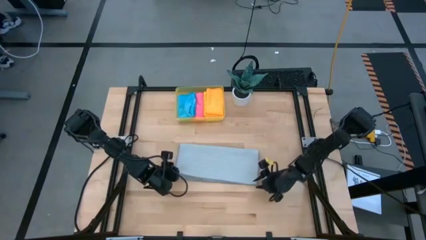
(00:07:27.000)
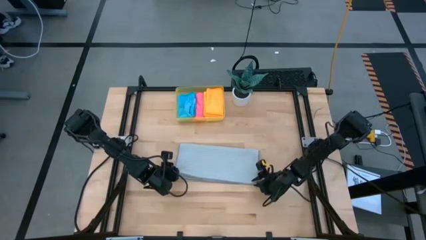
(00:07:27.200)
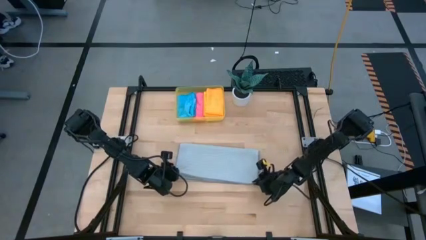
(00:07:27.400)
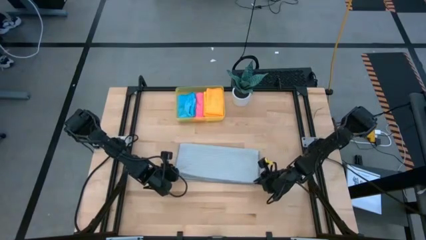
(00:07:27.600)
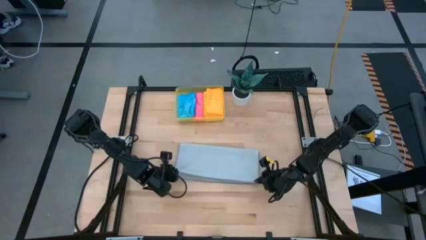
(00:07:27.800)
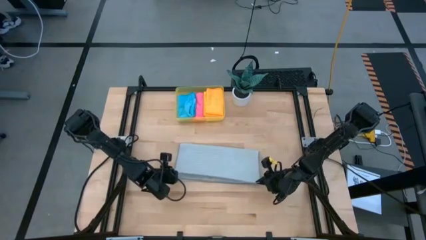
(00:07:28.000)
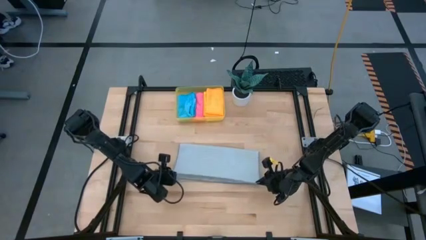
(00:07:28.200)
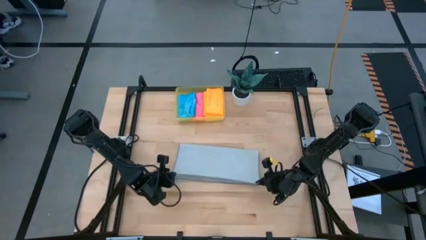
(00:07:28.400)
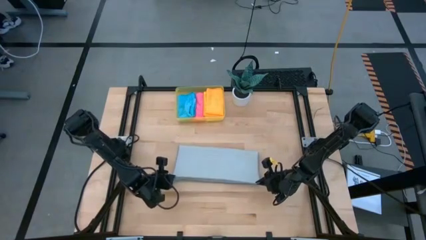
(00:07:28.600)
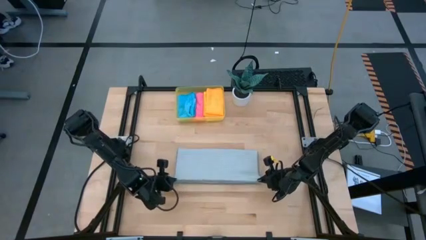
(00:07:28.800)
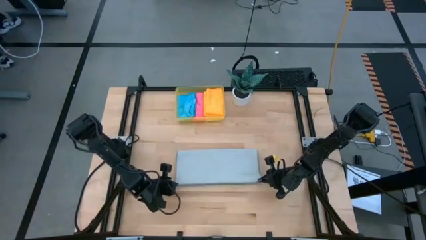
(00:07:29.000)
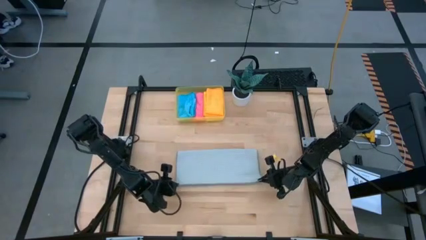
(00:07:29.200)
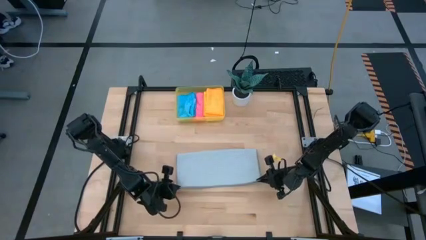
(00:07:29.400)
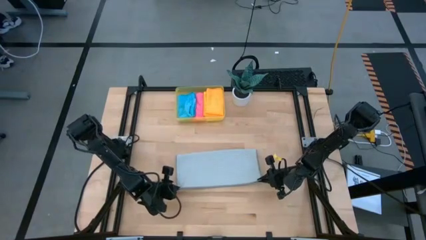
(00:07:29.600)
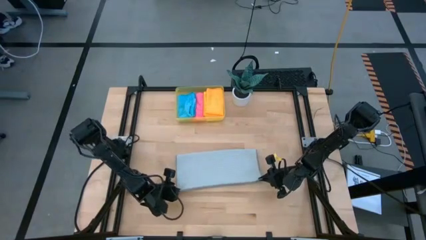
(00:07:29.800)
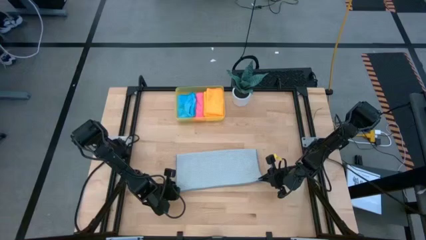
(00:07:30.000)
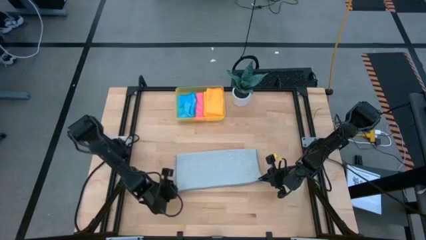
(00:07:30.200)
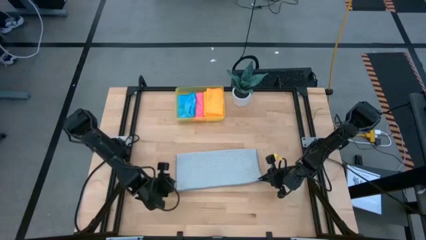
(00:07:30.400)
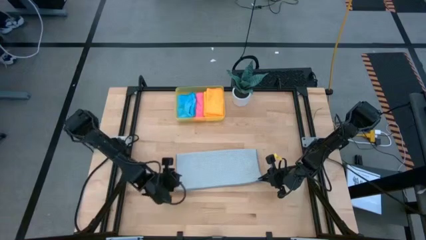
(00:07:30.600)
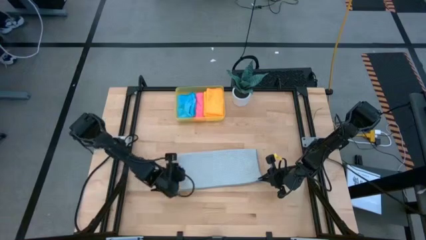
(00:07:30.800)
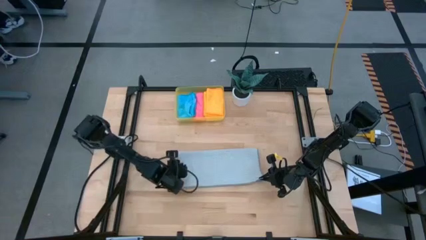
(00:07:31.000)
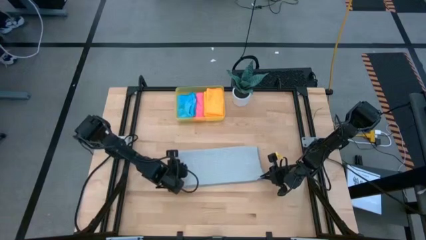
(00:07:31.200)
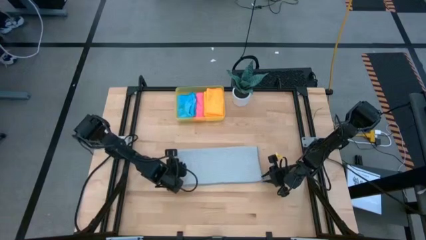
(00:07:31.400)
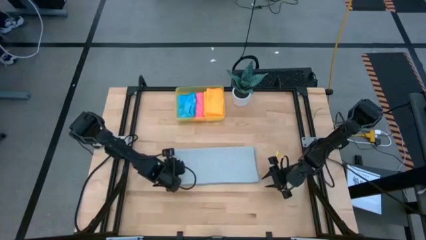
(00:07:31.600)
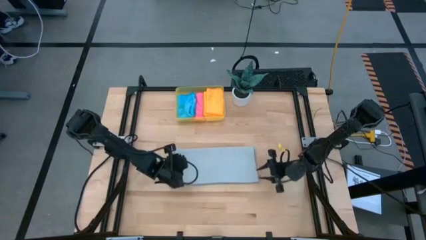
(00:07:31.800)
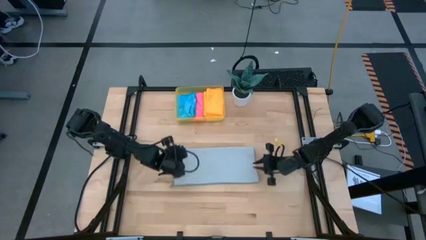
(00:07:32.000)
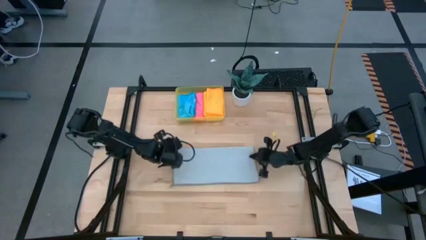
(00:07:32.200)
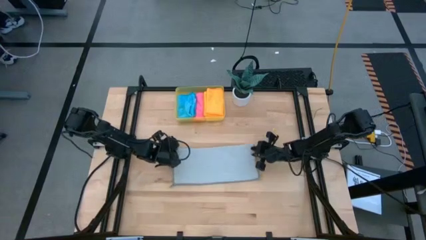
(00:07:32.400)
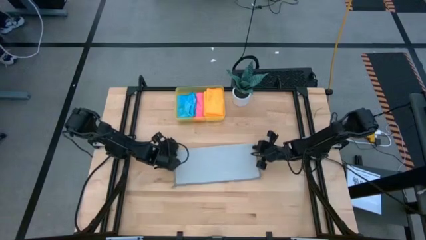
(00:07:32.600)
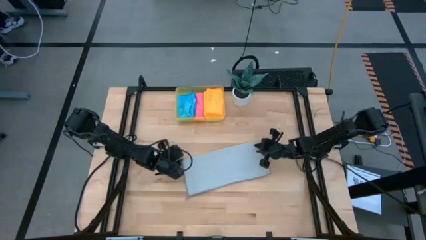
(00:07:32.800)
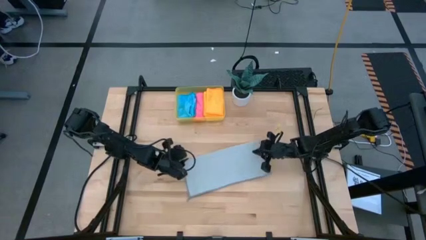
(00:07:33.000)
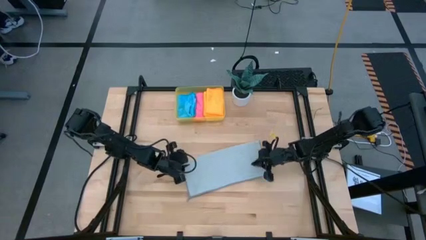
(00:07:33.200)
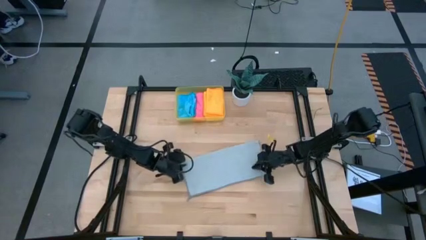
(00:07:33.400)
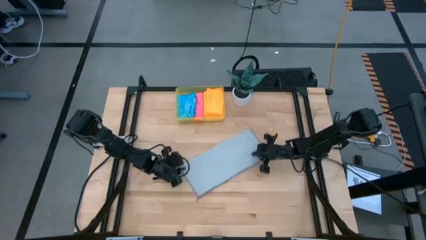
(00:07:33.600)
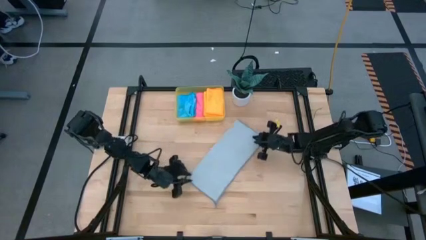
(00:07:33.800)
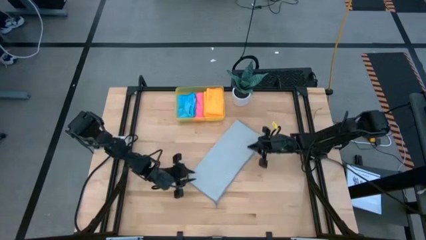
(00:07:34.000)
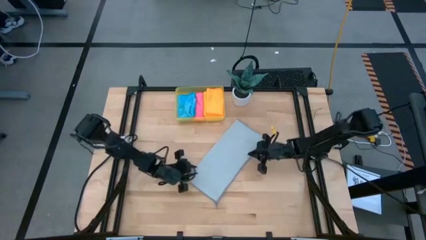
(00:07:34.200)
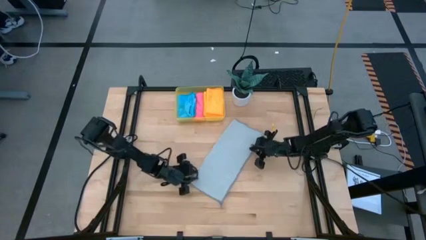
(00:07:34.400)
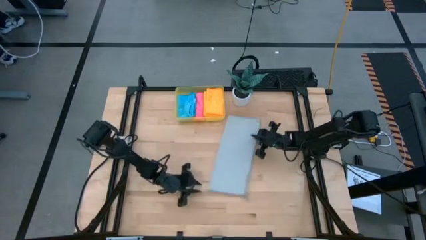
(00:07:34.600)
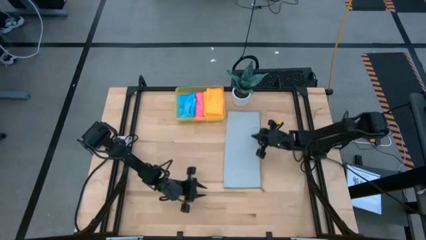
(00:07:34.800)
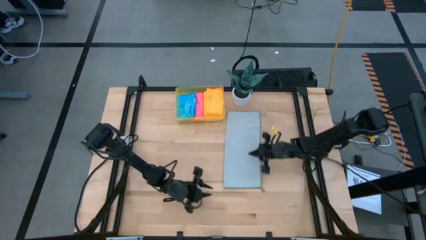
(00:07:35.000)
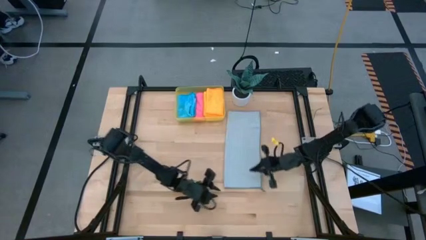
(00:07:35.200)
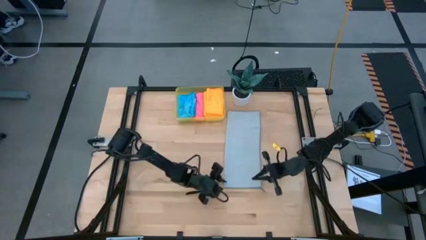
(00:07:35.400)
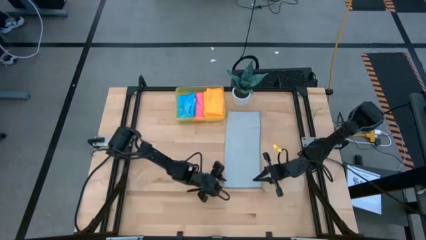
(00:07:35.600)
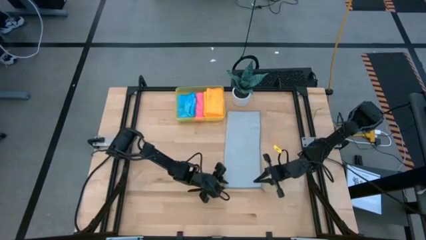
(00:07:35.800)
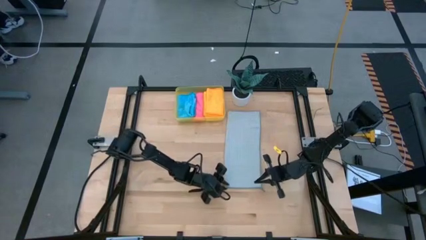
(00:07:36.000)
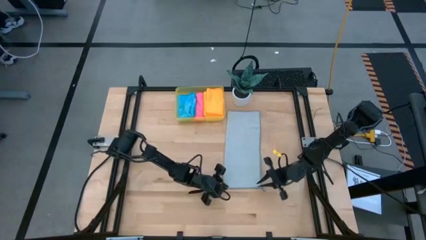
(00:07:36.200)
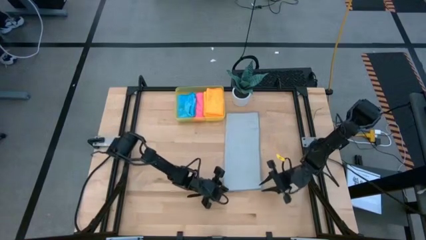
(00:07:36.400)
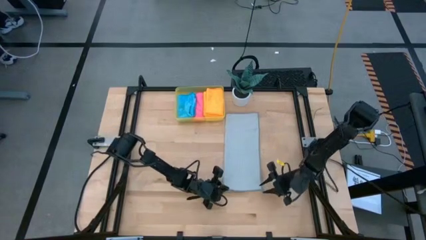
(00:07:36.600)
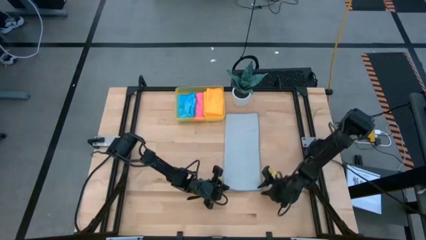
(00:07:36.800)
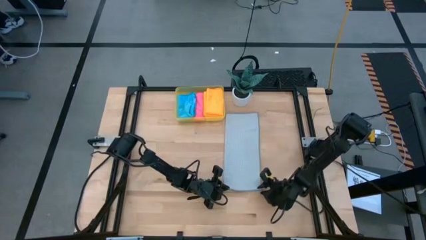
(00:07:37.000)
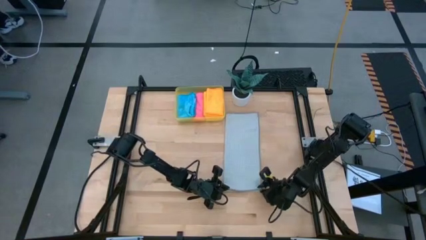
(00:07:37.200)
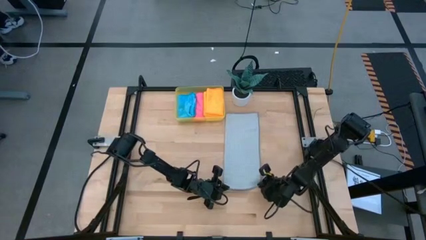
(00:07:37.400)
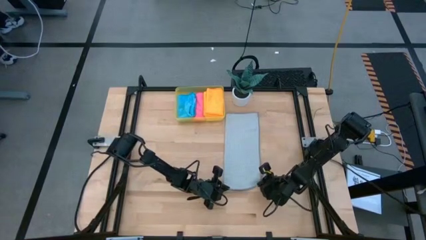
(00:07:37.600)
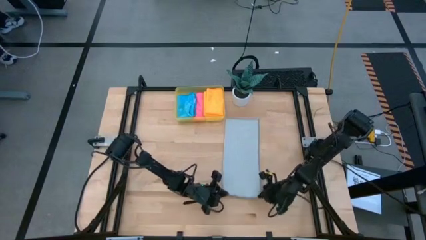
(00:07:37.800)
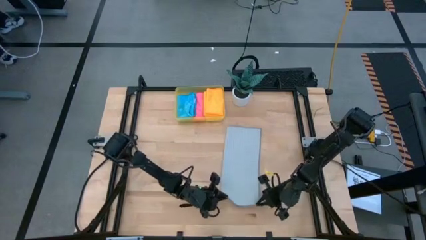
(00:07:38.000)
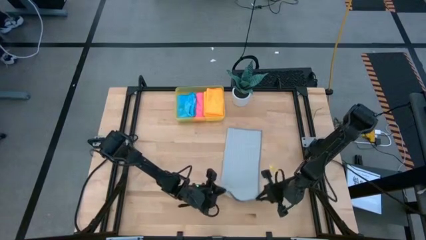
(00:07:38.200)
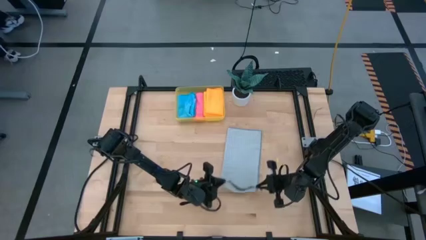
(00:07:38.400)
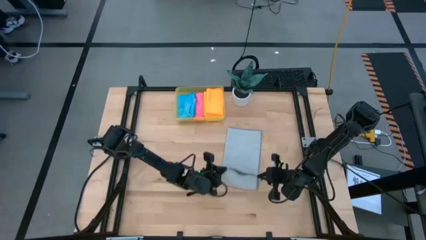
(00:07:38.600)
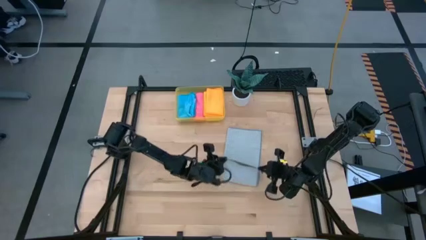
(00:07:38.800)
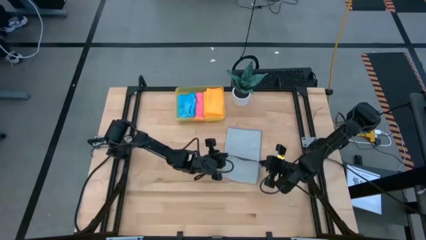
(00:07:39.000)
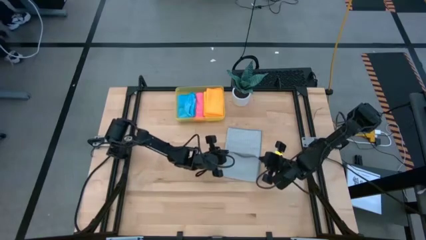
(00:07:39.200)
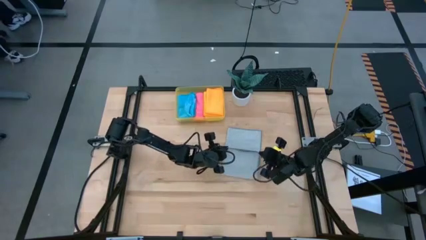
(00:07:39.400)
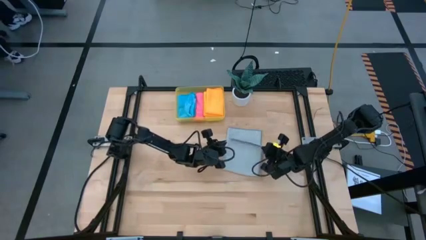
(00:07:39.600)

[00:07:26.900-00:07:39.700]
Task: Fold microfiber towels
Fold the gray microfiber cloth

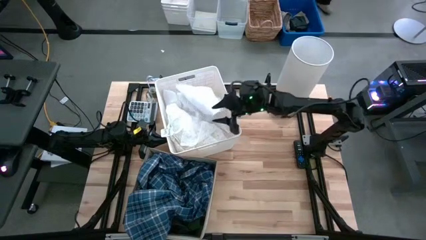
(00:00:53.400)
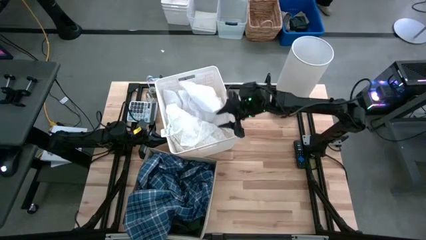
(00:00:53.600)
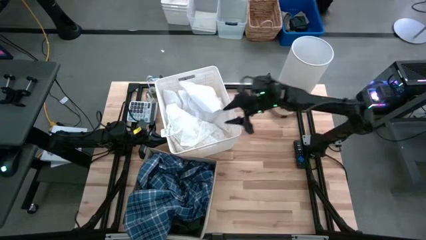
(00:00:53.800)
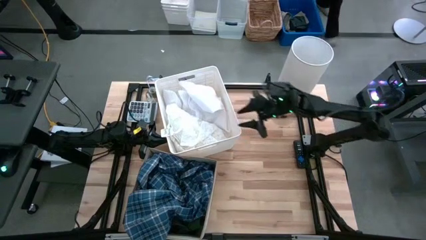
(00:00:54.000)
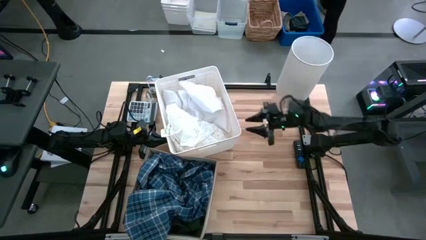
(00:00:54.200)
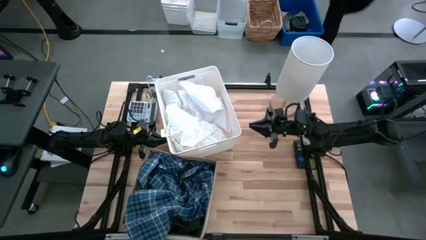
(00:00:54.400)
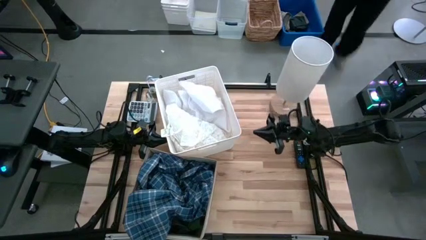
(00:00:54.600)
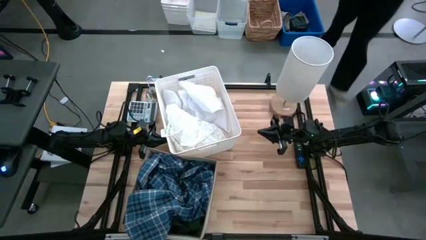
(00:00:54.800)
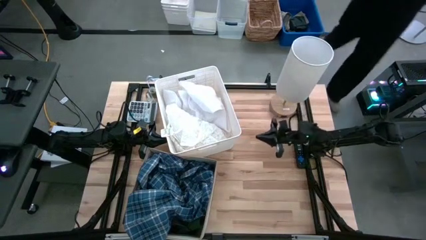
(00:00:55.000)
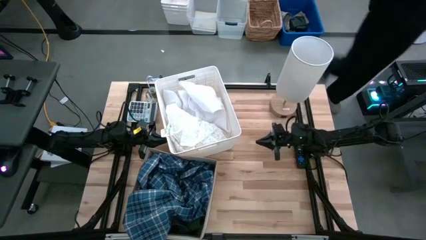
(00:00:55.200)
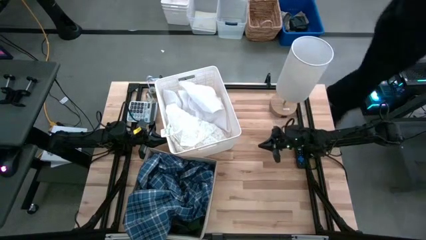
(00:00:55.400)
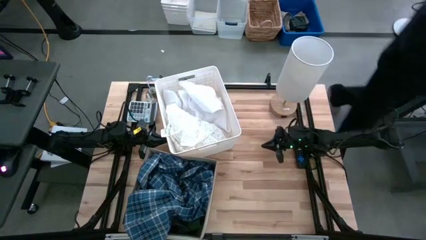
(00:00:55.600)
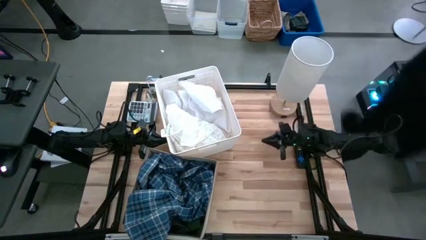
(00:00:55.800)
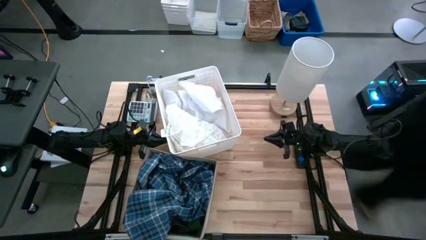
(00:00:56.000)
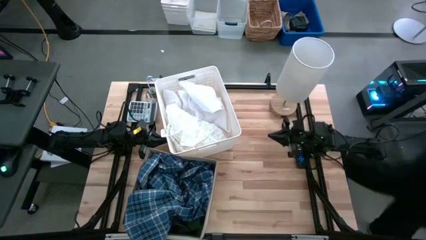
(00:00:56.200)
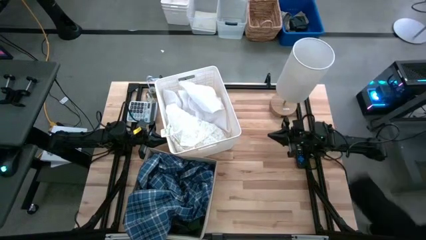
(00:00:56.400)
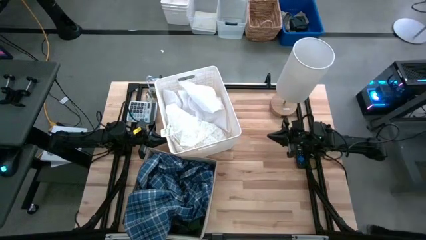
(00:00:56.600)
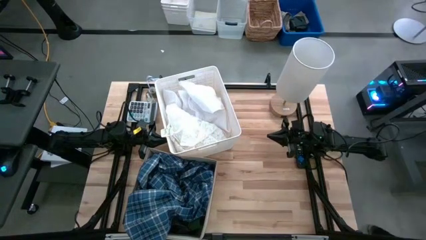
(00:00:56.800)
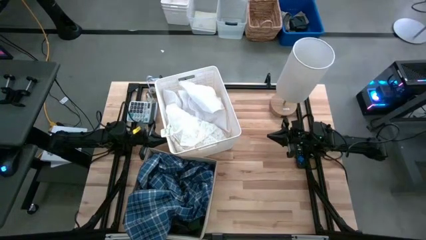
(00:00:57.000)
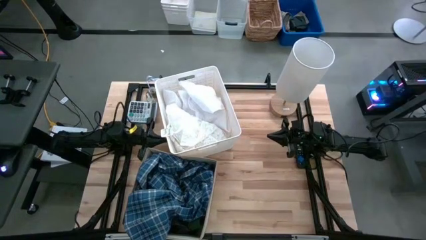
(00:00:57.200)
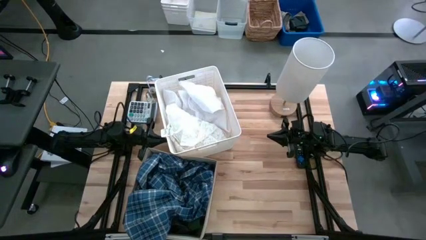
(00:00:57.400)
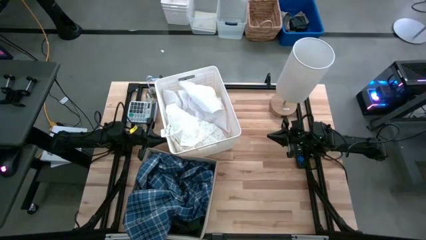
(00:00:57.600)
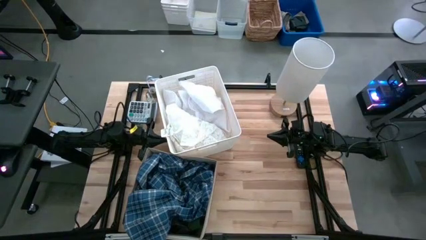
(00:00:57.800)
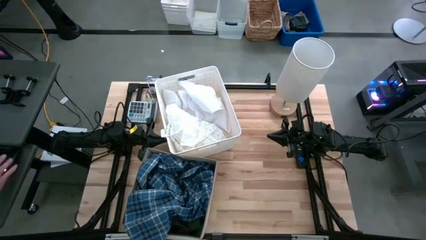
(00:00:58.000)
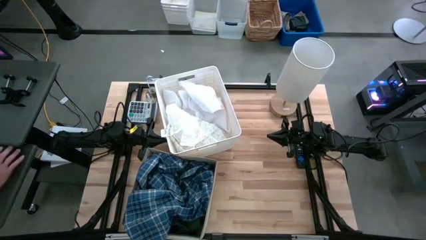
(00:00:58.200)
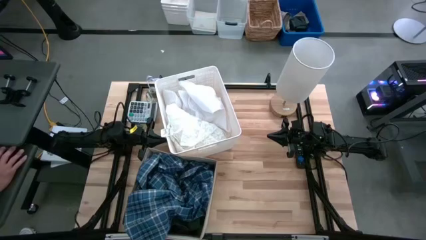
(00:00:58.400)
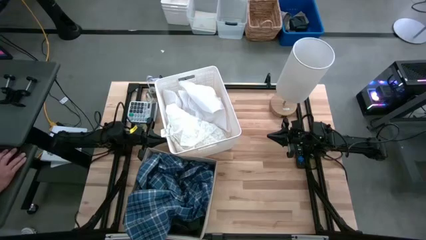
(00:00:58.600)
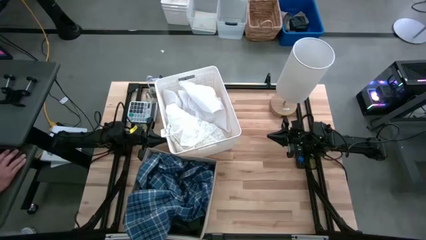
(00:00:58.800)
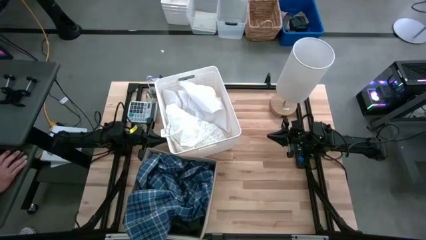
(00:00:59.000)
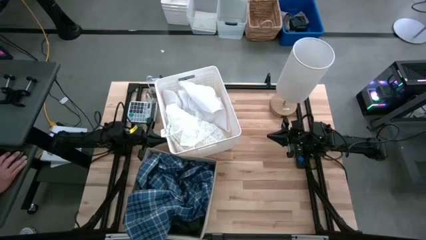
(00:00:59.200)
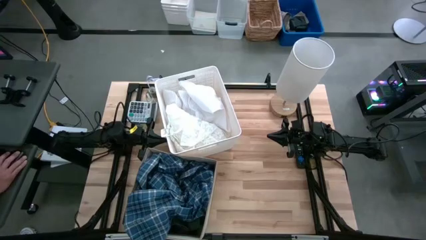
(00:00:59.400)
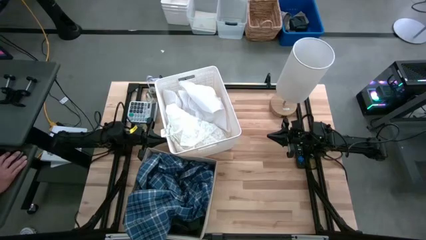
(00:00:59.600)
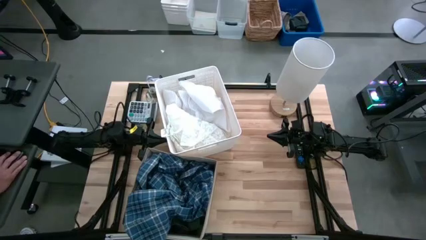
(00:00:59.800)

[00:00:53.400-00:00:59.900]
Task: Sort clothes
Adjust the white shirt
